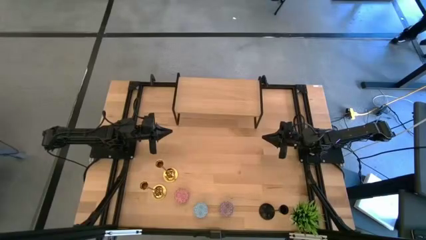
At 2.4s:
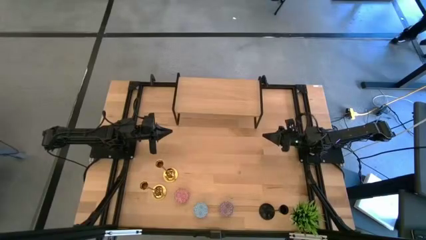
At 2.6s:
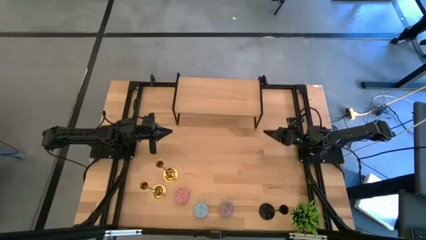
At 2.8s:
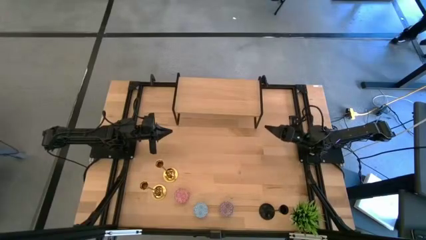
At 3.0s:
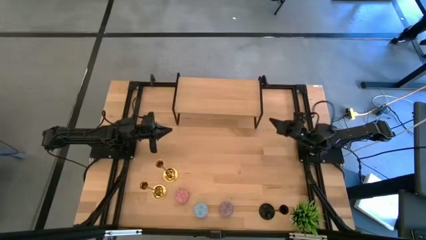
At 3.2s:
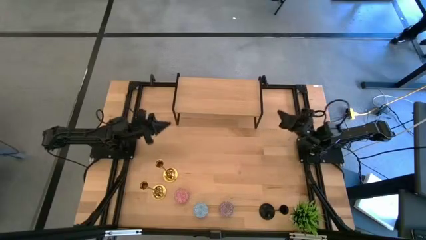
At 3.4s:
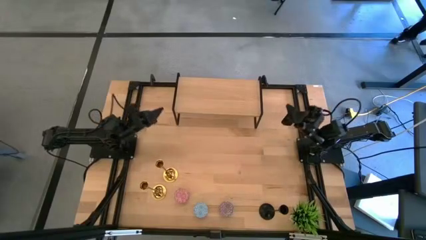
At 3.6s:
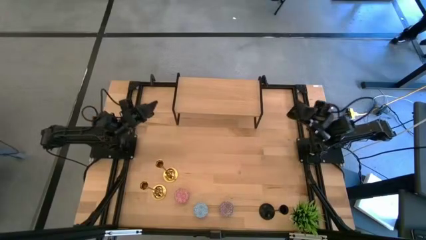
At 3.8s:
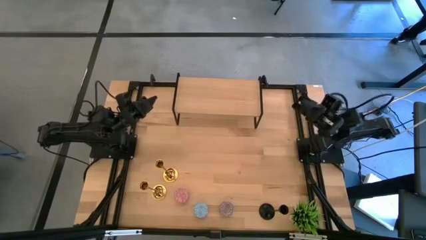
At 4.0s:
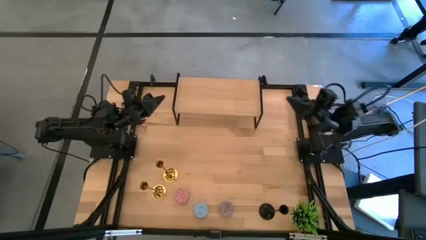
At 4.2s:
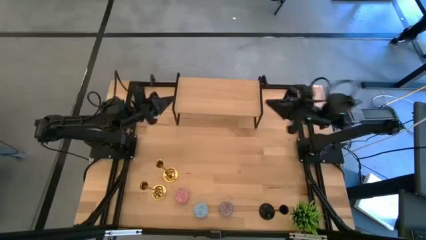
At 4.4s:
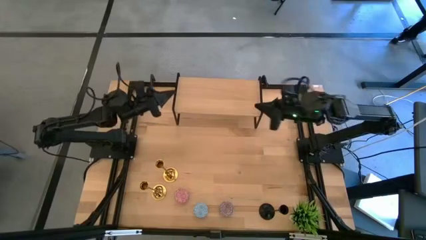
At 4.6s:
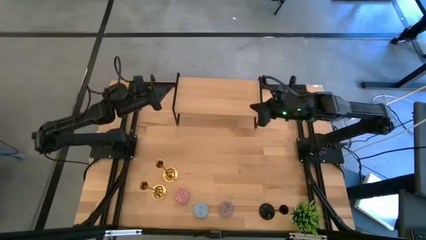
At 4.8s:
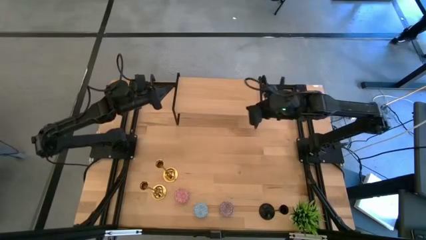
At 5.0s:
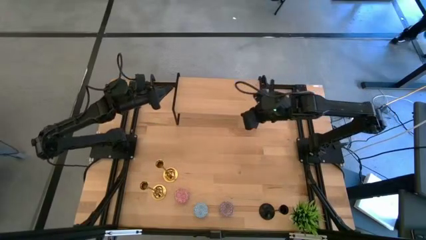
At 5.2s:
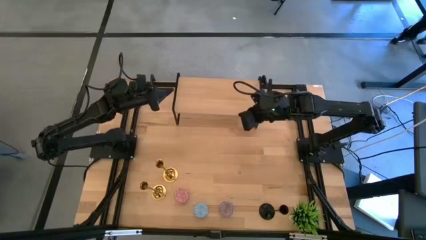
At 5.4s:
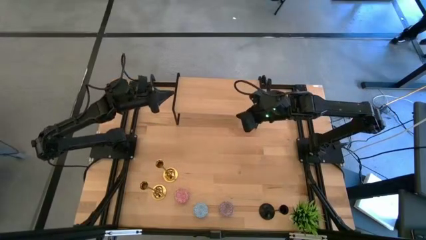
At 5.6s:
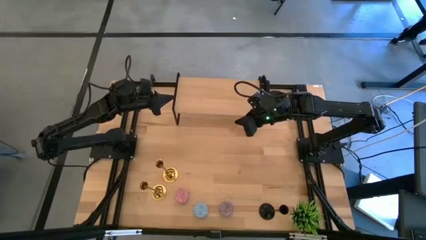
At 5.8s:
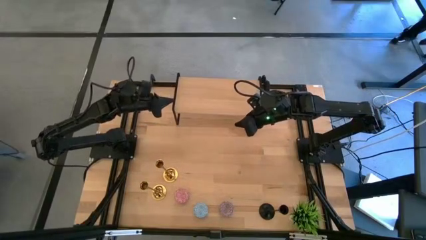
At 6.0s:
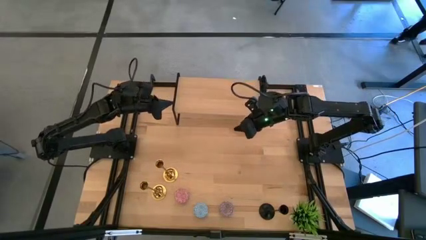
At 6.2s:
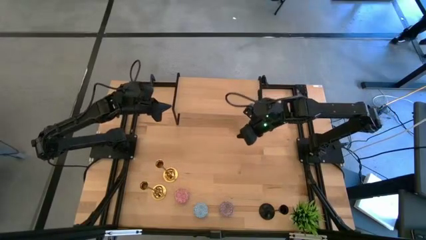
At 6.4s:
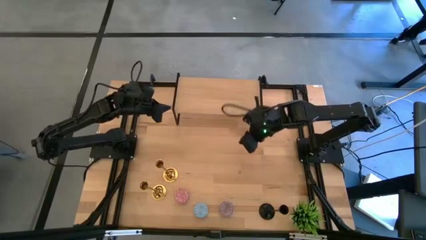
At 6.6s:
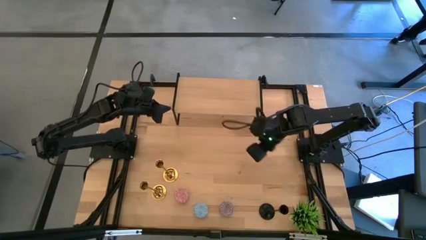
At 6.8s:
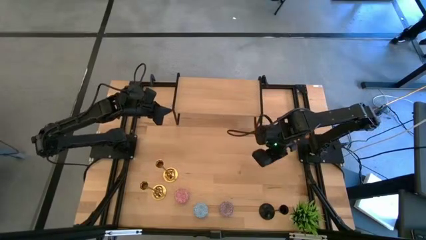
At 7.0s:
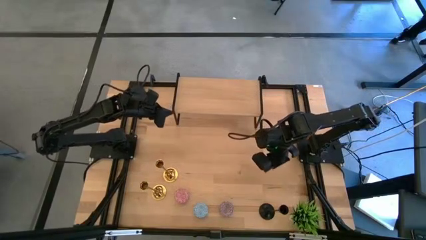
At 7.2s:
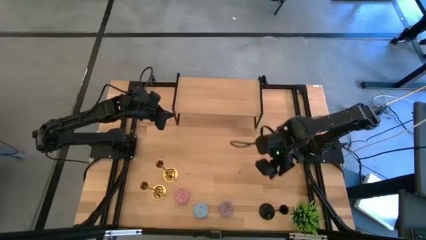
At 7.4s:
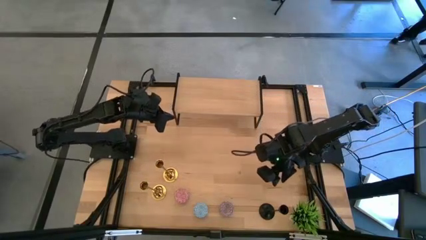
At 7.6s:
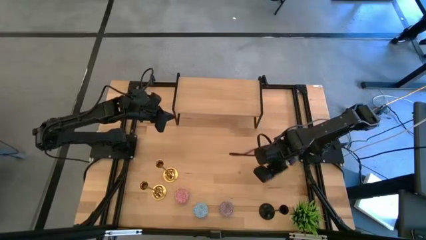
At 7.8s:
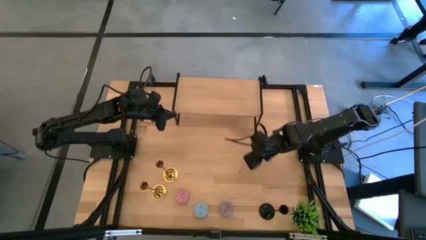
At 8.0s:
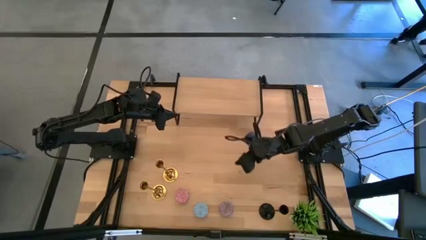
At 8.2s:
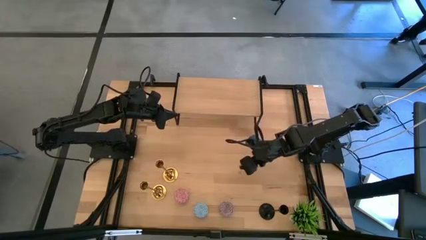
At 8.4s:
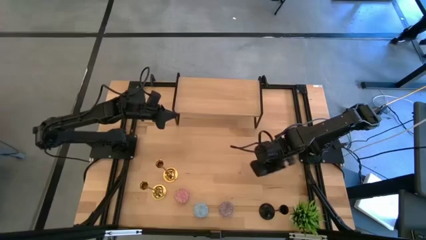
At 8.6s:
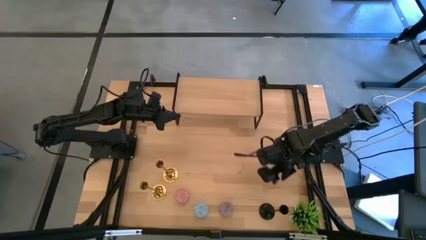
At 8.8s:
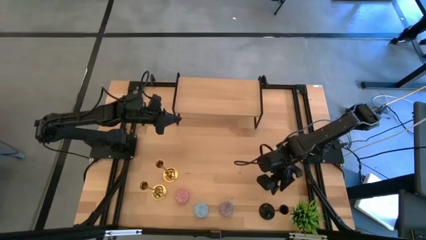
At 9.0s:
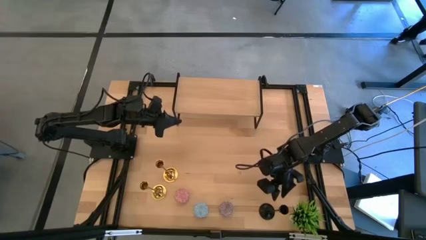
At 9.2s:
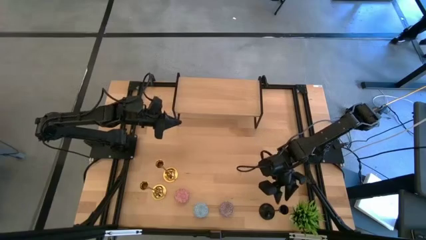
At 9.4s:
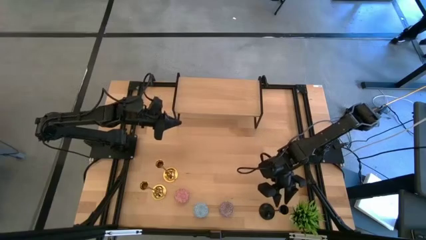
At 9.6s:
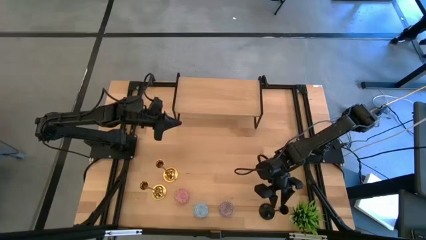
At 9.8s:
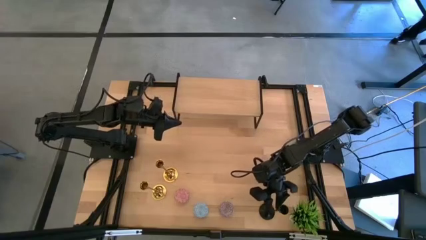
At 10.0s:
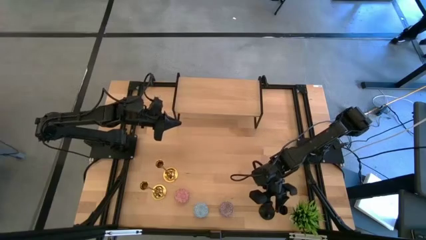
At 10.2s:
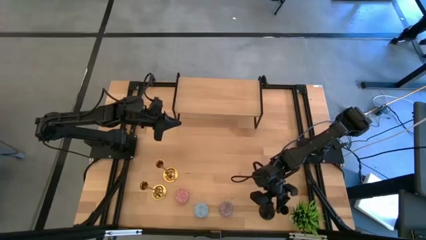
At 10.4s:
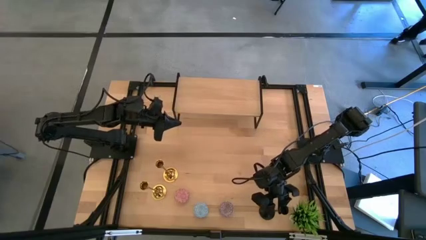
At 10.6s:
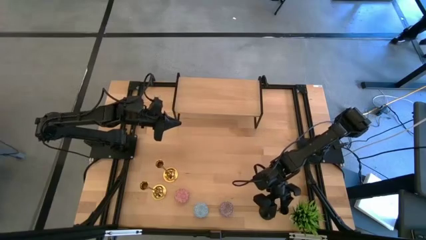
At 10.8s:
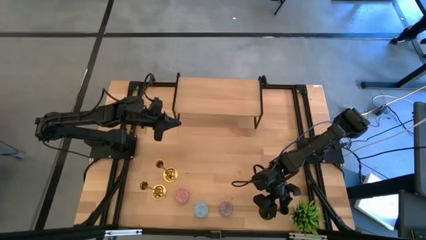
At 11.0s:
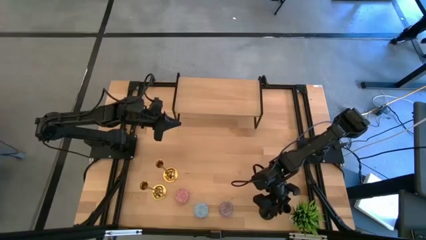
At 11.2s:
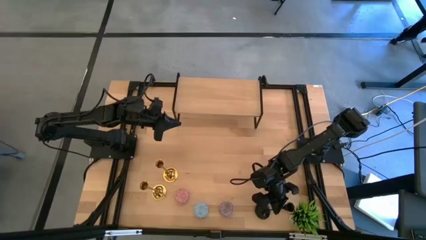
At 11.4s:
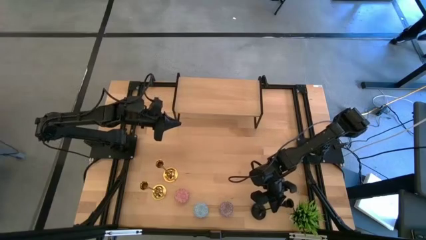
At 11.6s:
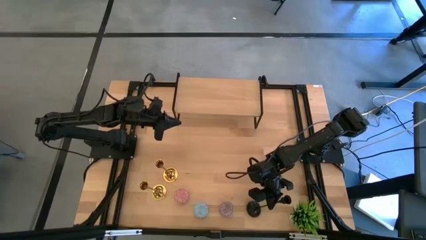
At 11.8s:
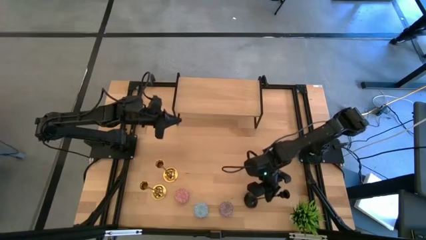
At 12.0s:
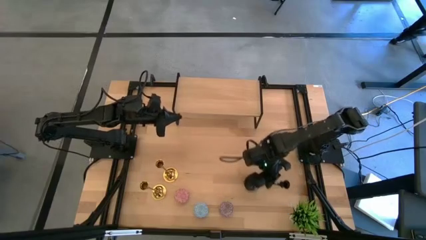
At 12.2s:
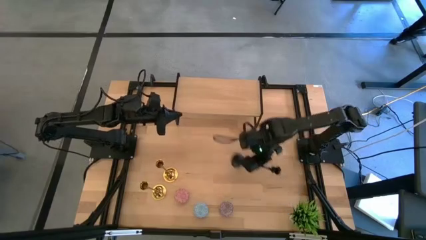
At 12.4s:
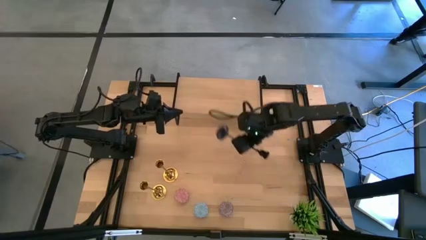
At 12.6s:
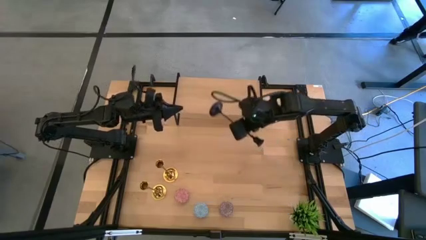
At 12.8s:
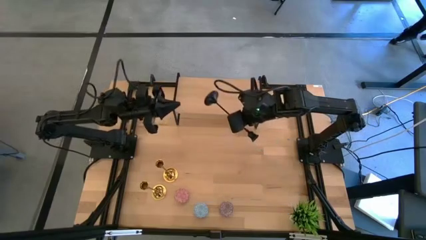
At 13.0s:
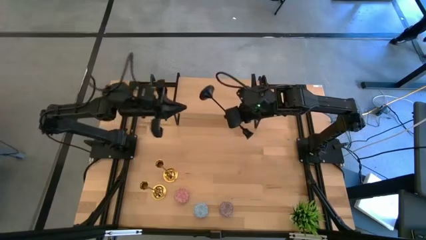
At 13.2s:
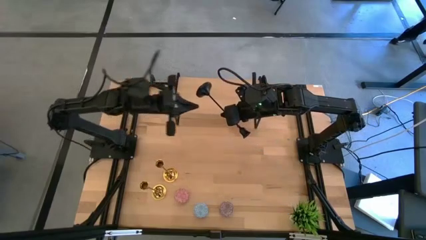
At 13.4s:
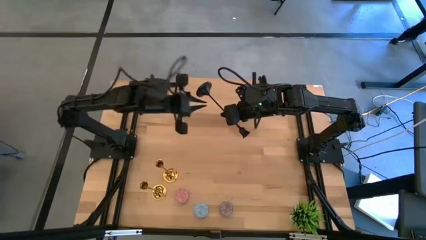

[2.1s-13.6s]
Task: Pick & Place candle stick holders
Put the black candle holder on the shelf
